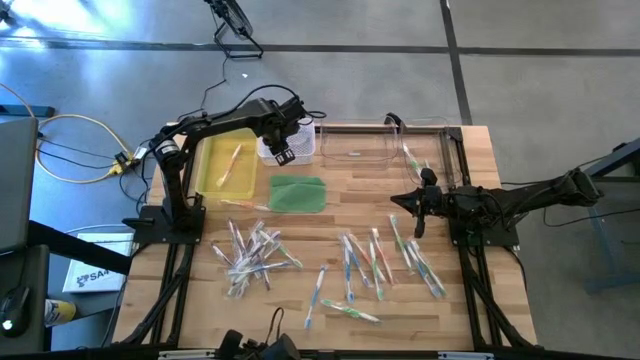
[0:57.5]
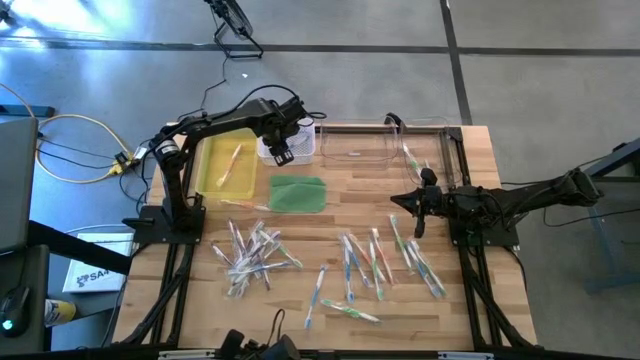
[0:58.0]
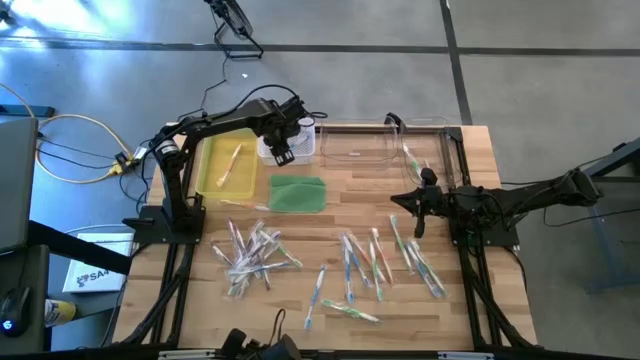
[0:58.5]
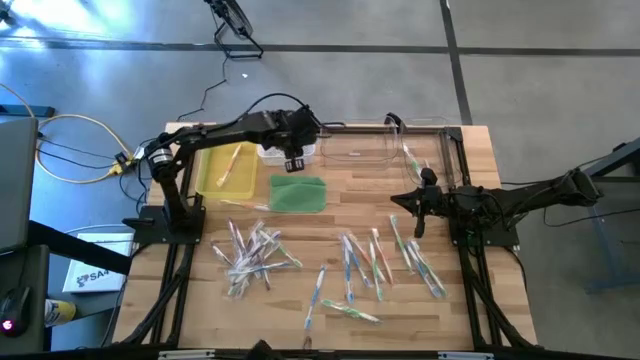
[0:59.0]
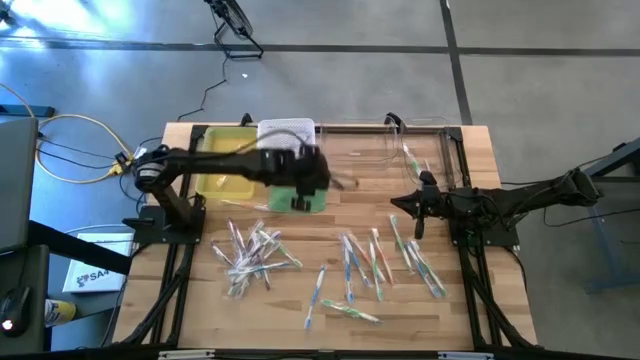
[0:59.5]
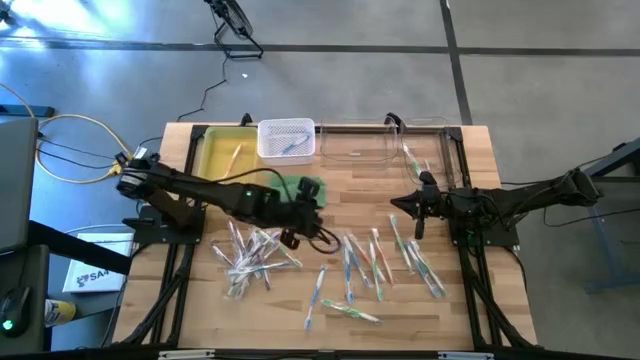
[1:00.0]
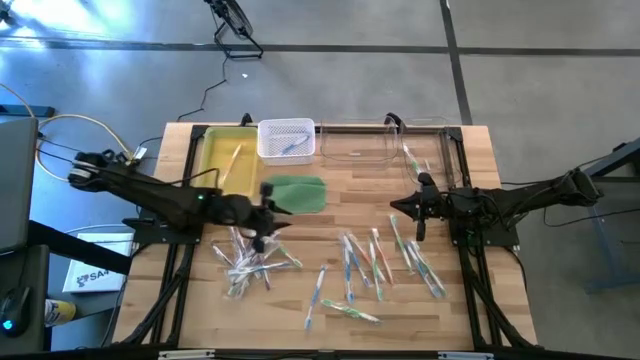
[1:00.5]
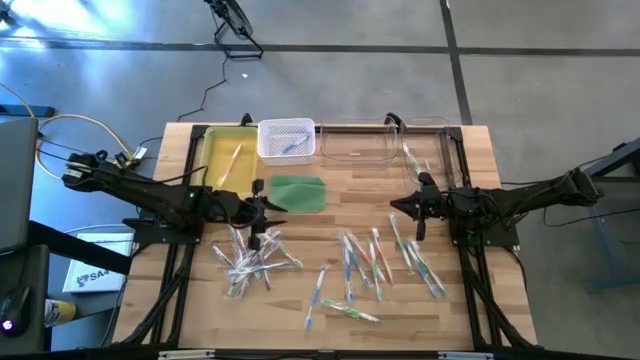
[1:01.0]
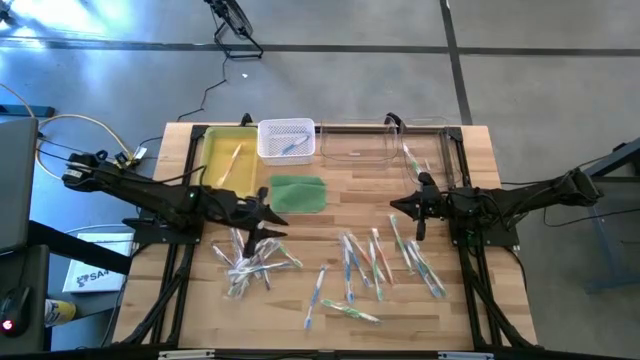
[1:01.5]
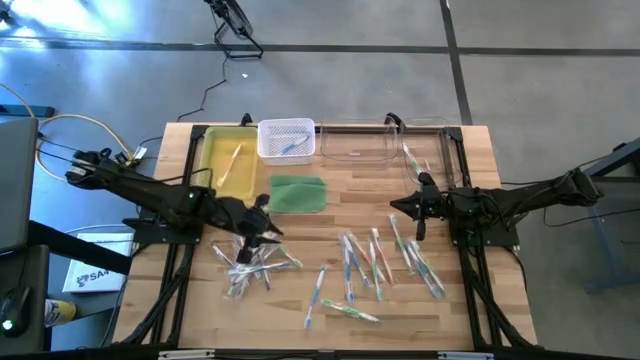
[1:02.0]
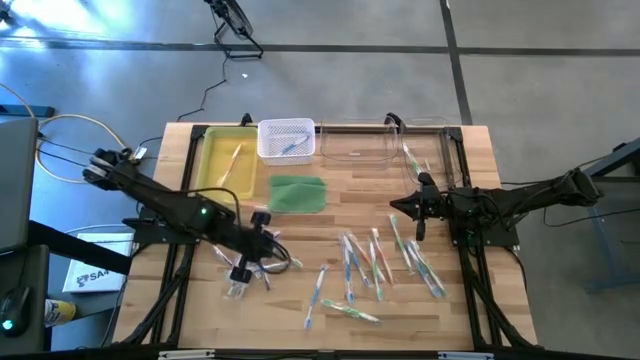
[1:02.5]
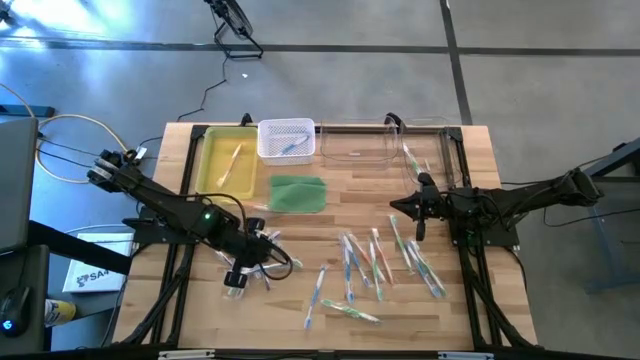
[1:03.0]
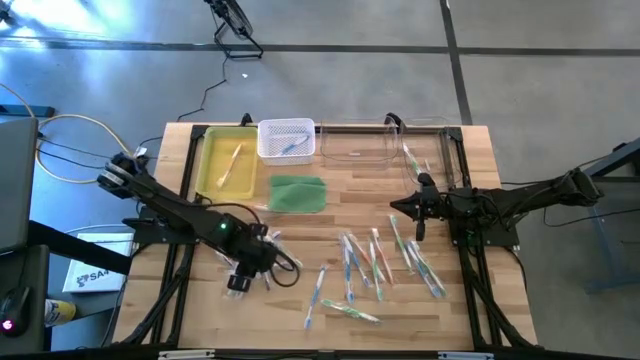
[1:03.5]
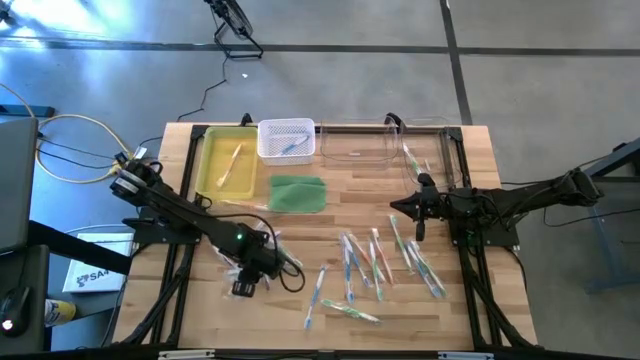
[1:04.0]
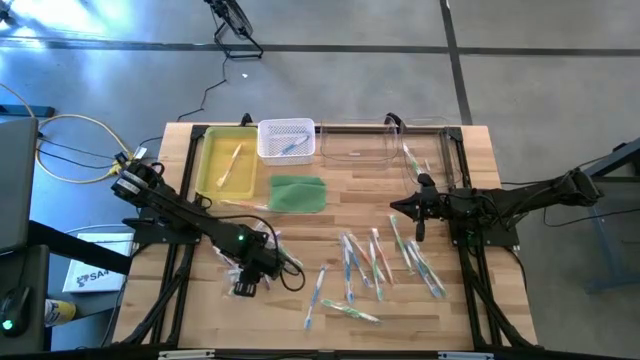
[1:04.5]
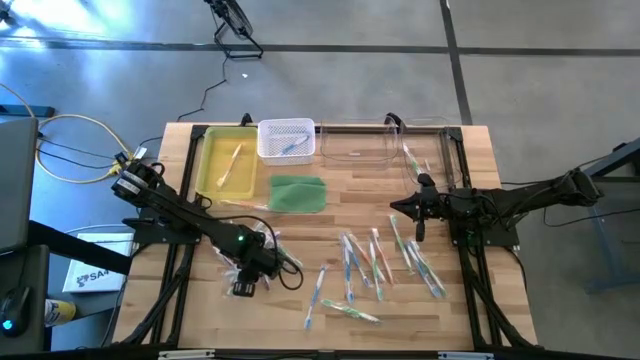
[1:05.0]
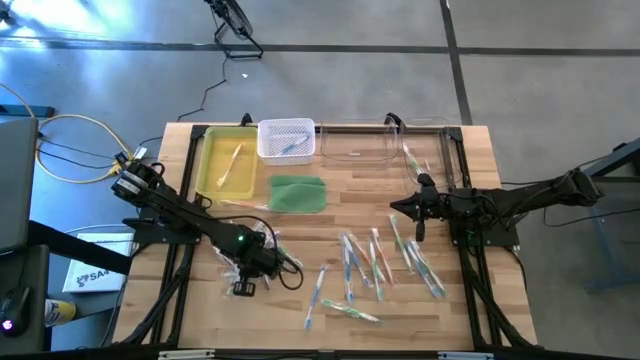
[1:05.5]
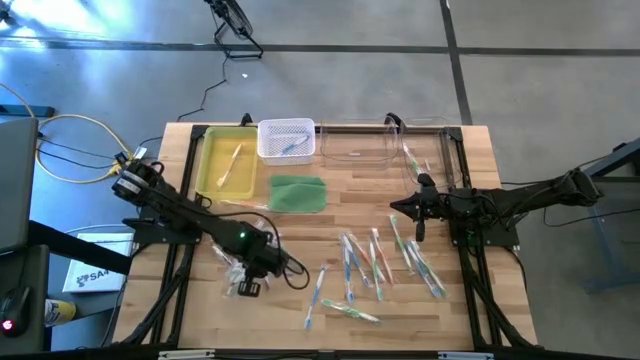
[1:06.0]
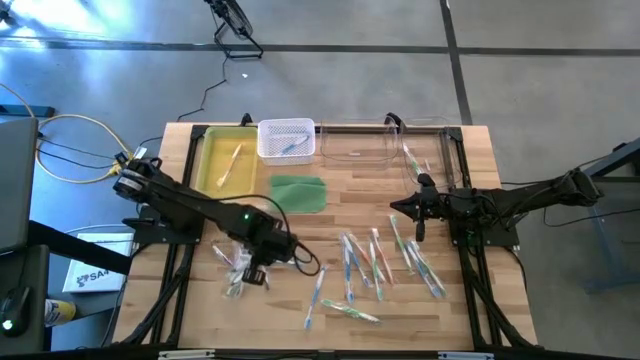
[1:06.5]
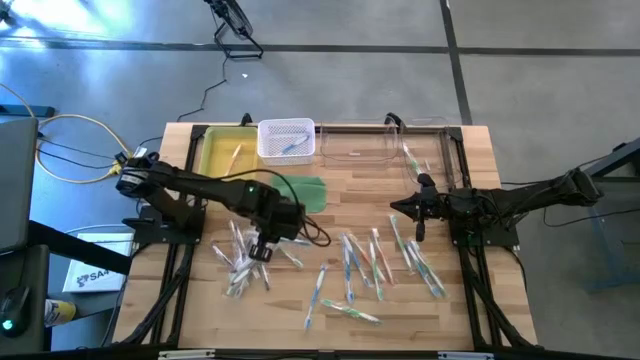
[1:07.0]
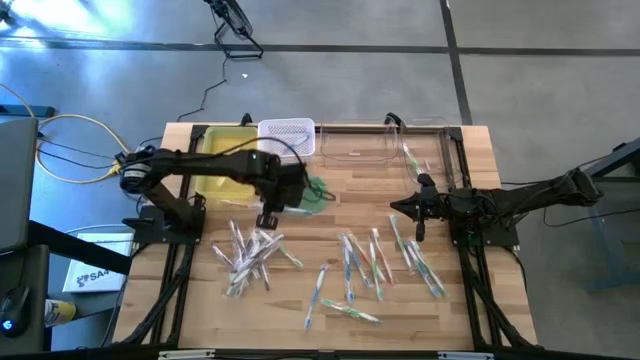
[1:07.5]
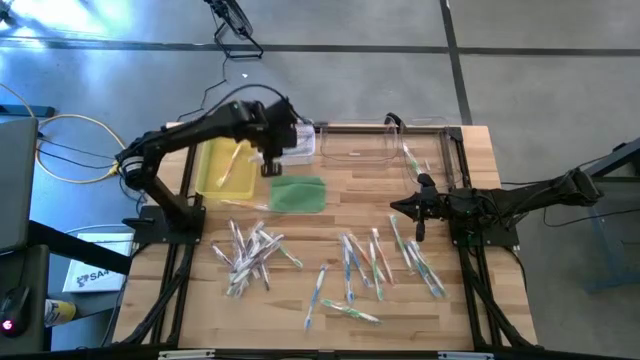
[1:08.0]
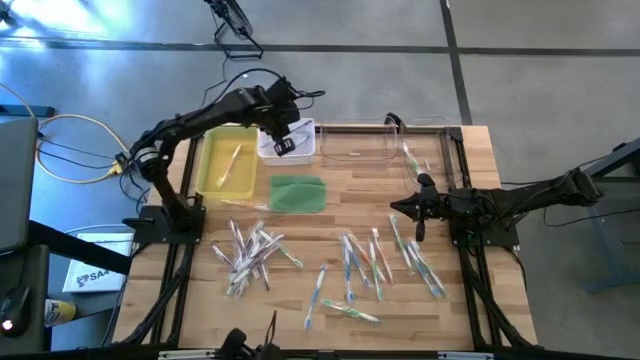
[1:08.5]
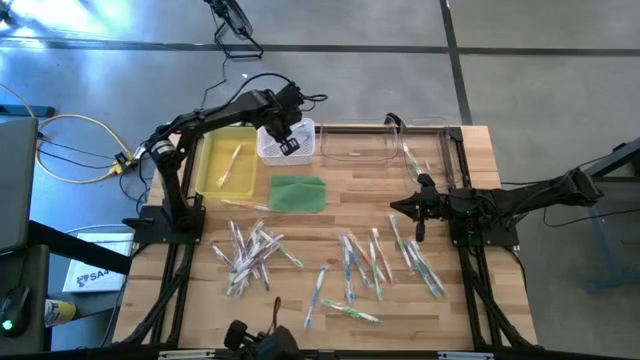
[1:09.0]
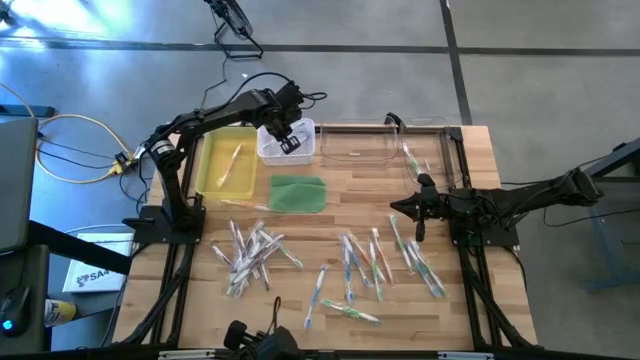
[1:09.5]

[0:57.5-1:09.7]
Task: Pick & Place Toothbrushes
Put the blue toothbrush into the white bin

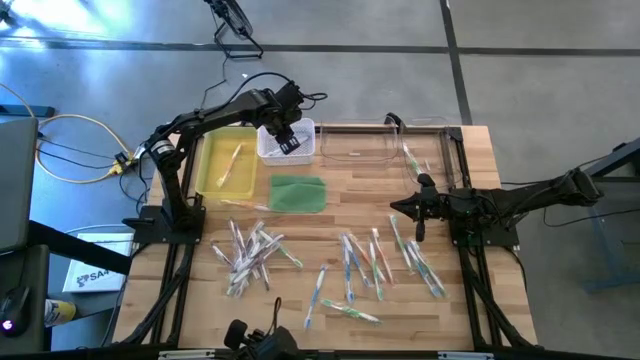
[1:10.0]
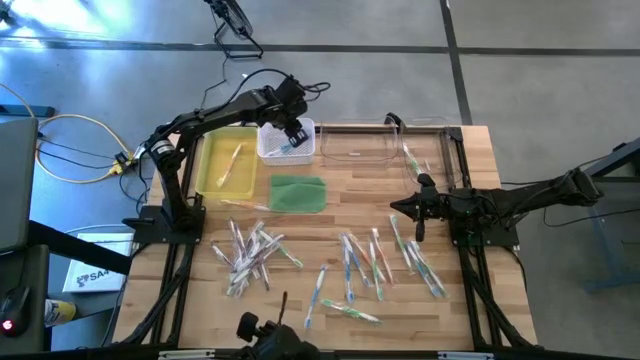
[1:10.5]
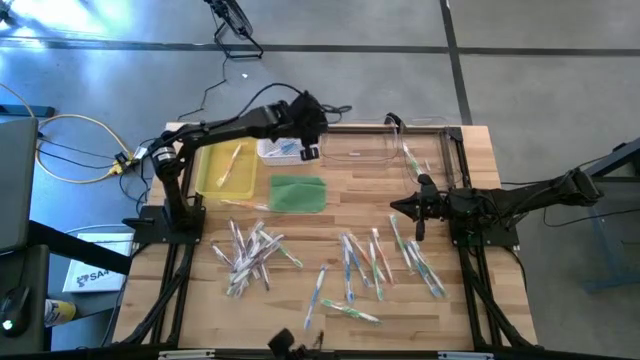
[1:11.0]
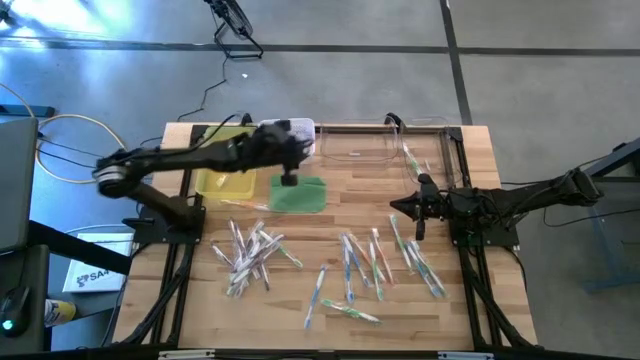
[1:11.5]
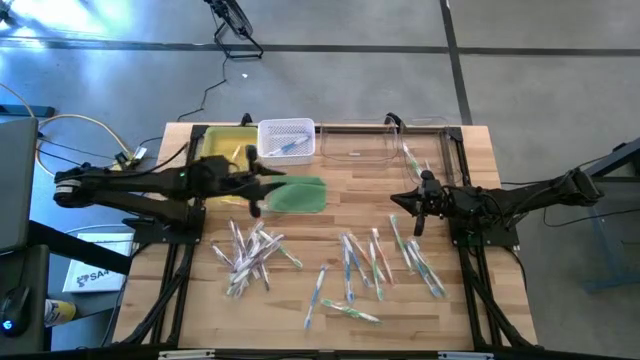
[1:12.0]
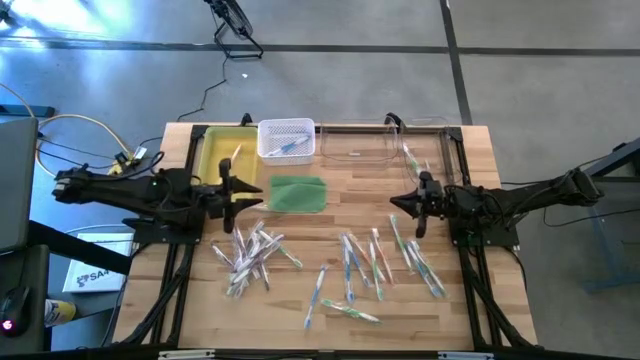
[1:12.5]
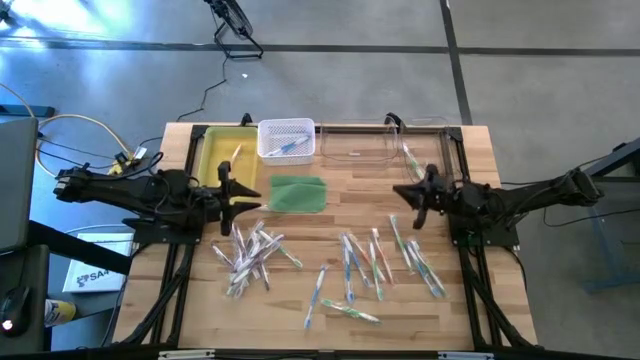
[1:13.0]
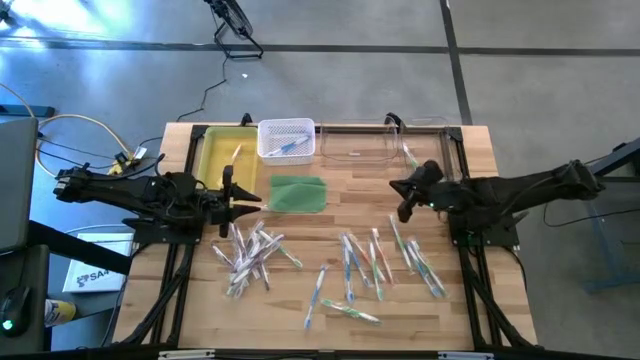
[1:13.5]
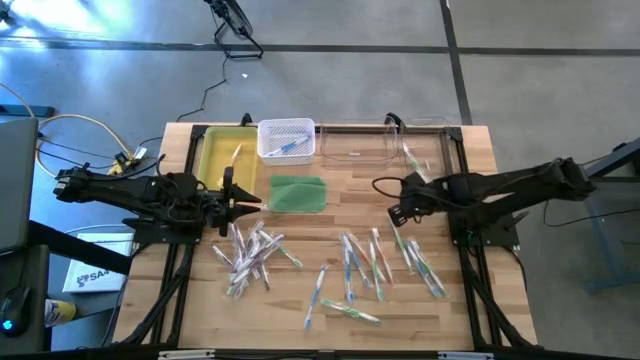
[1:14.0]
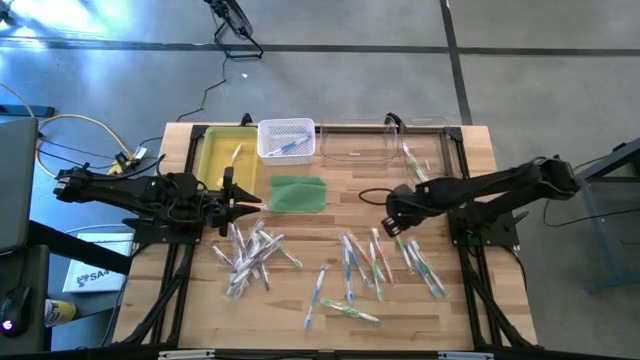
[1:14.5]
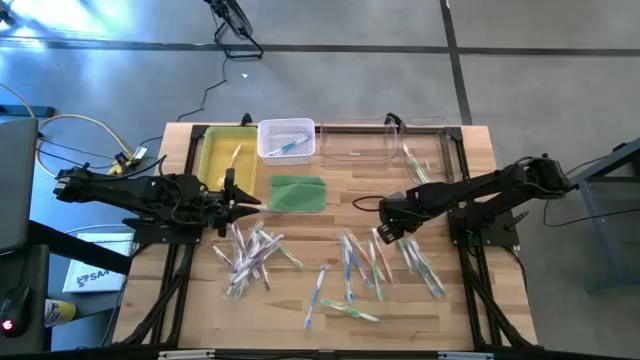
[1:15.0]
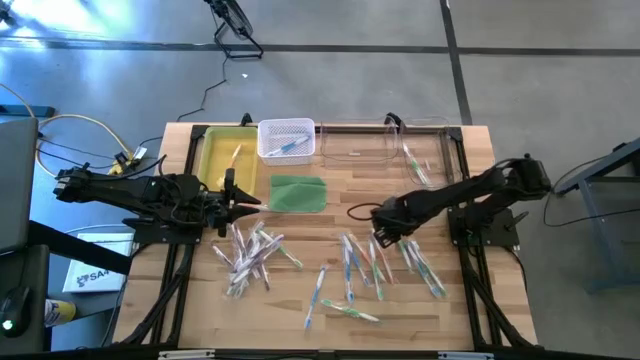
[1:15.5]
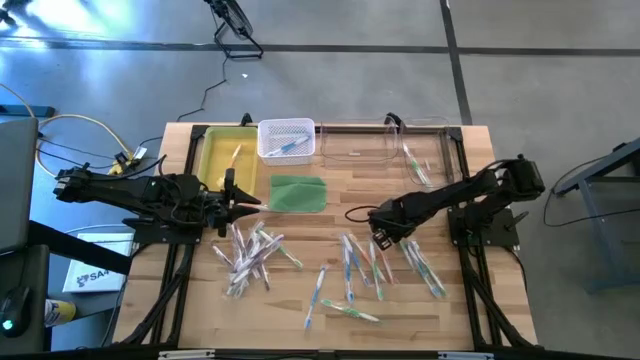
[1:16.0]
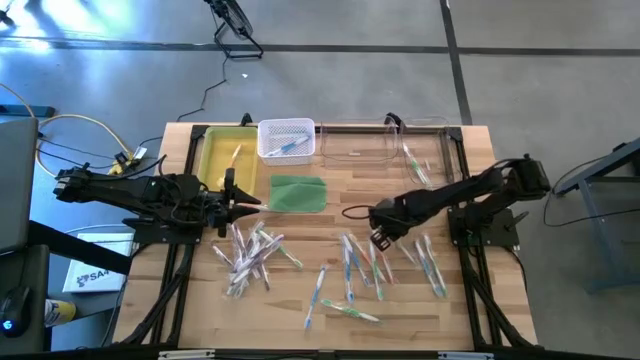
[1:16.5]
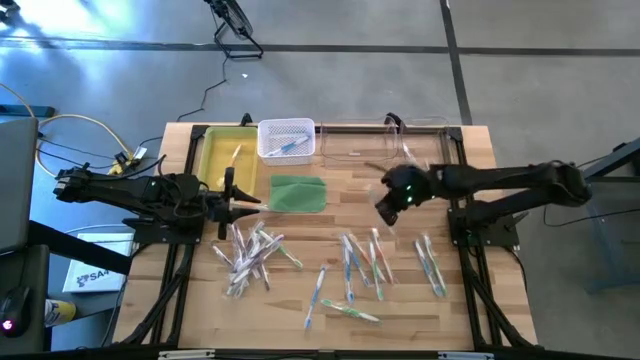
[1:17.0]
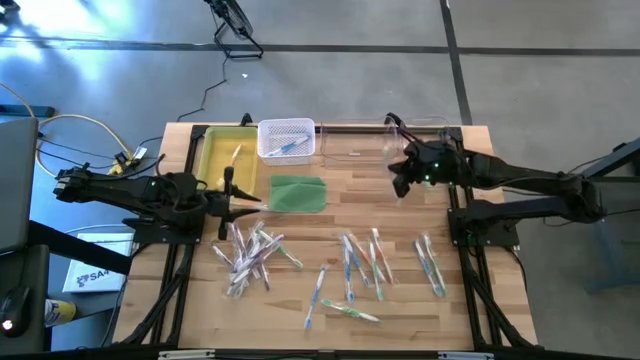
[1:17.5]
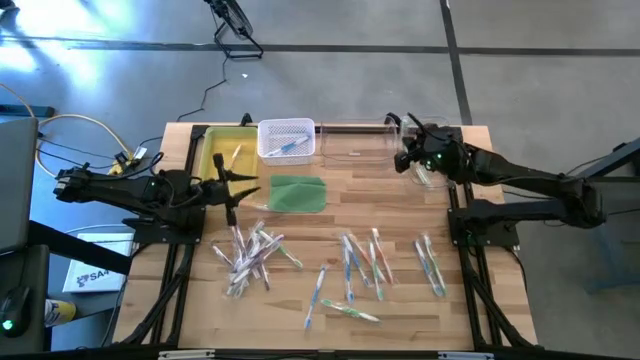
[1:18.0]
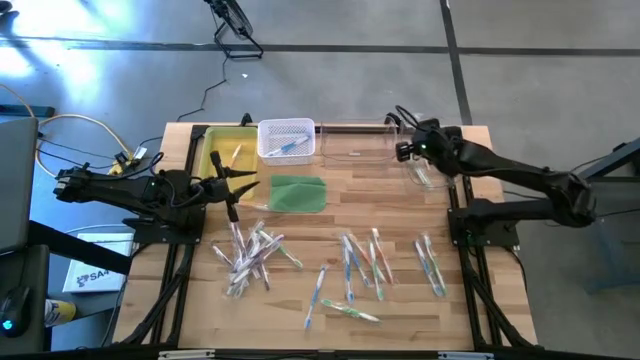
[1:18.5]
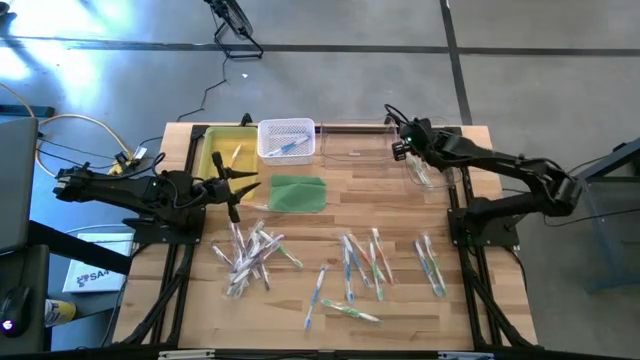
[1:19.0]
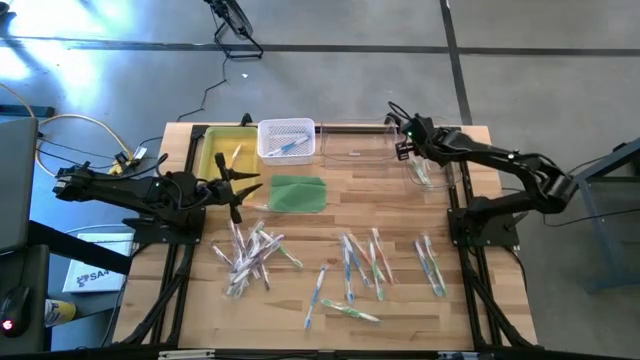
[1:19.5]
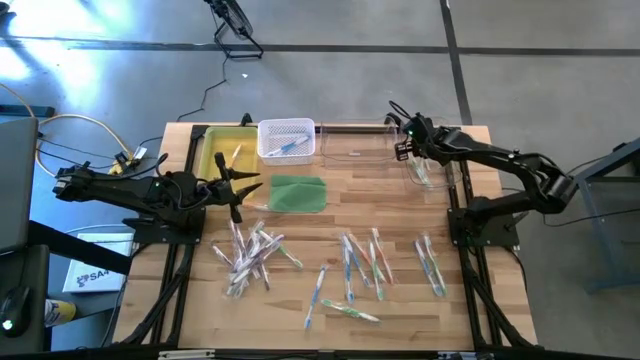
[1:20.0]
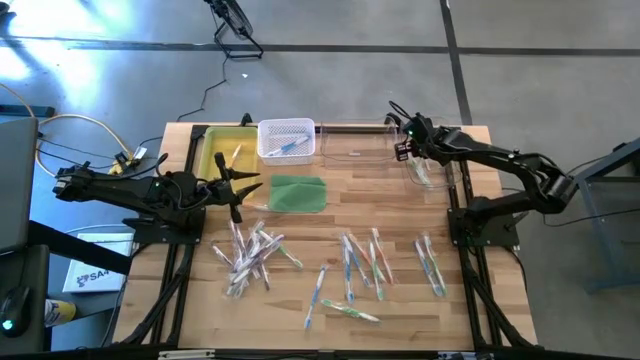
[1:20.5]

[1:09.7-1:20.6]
Put the green toothbrush into the right transparent bin
